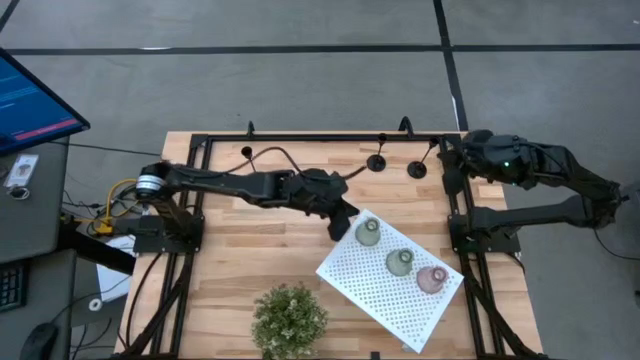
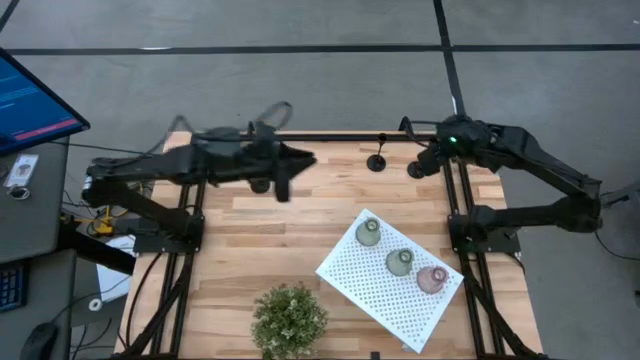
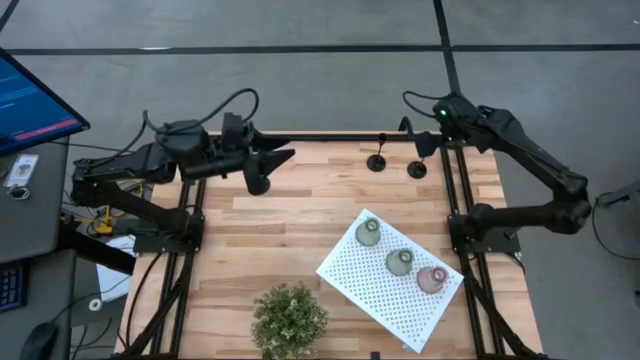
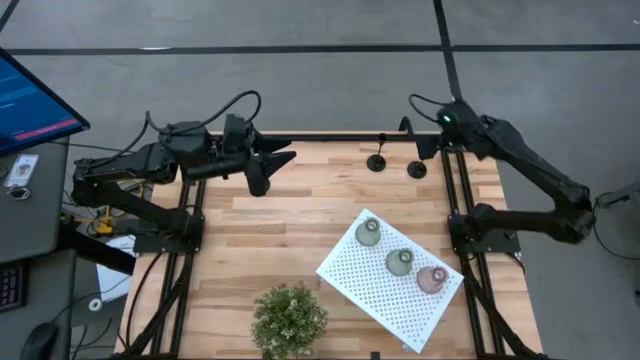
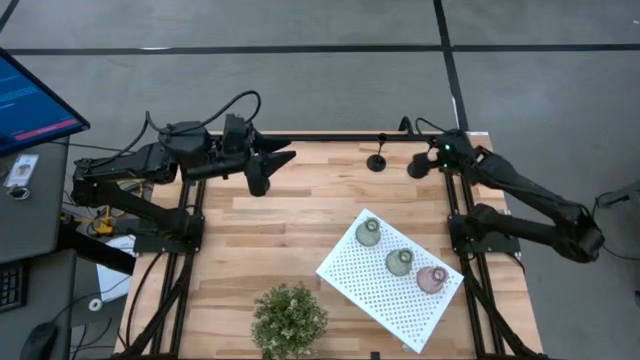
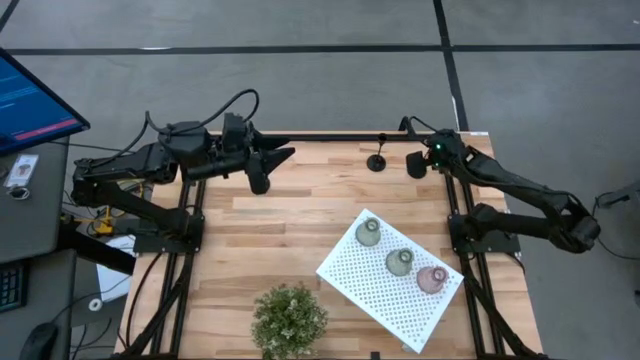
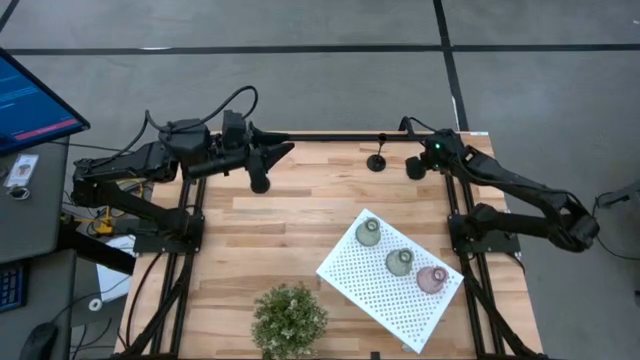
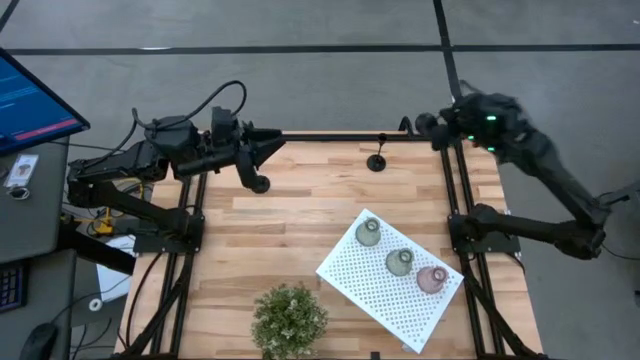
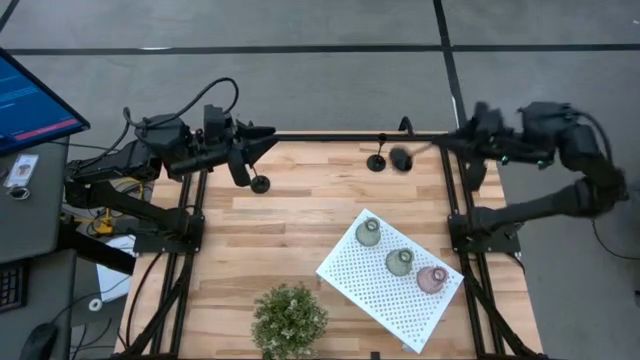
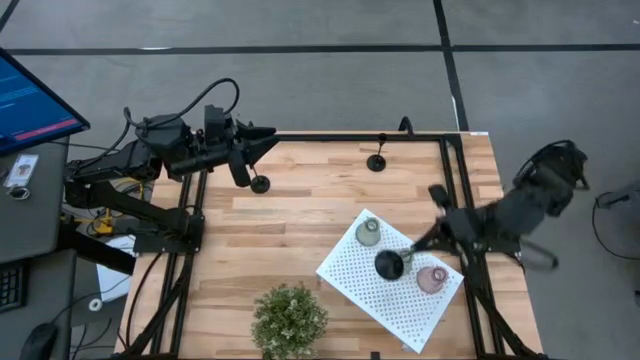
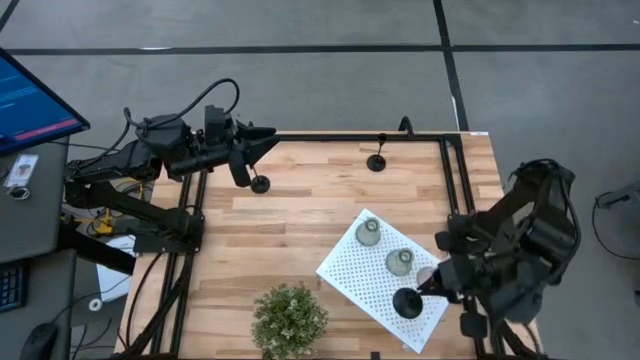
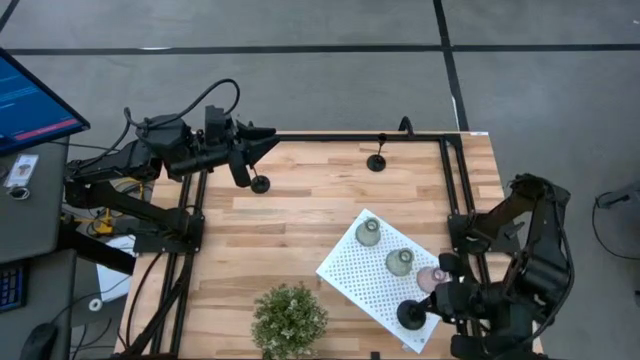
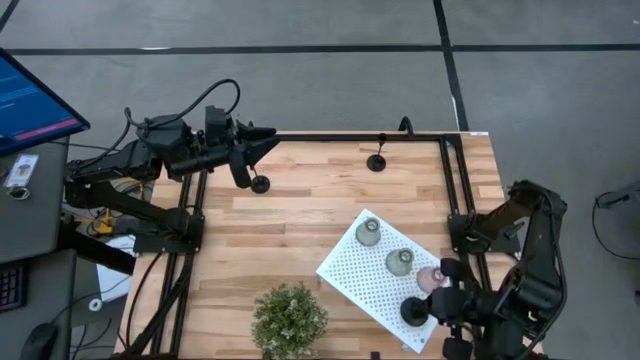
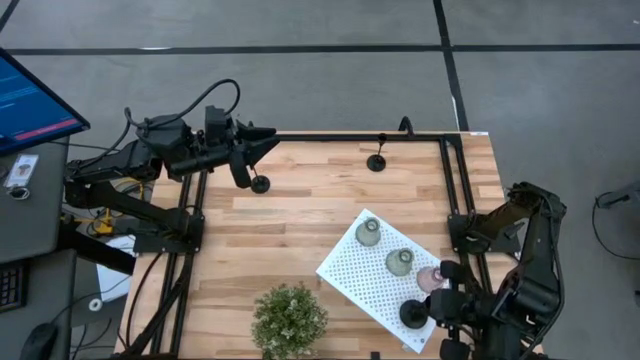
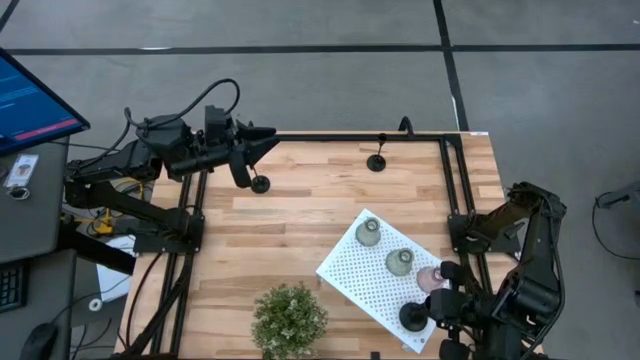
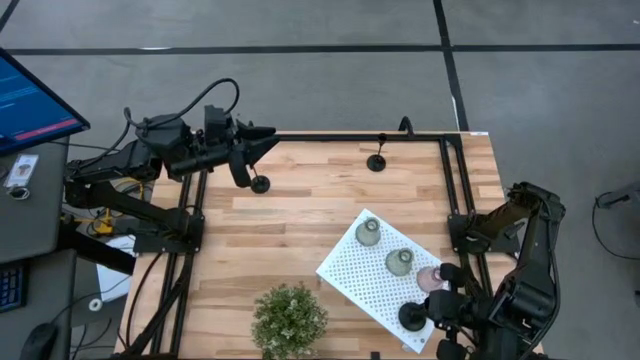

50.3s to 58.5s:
Task: Pick & Place candle stick holders
Put the right black candle holder on the shelf

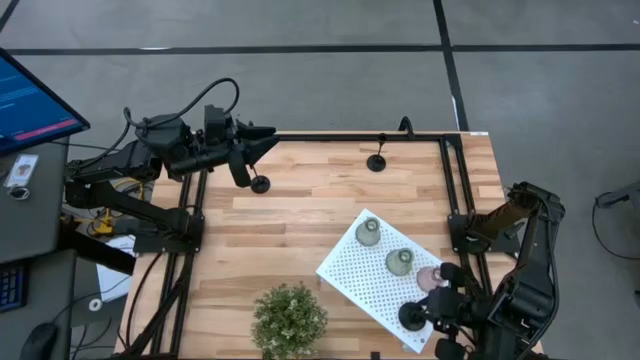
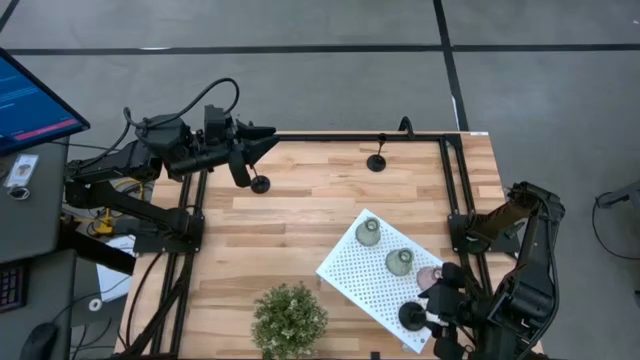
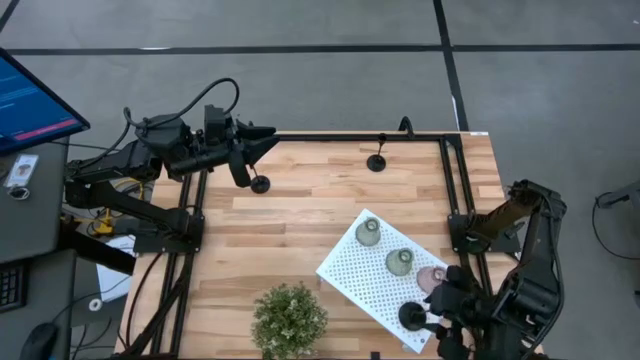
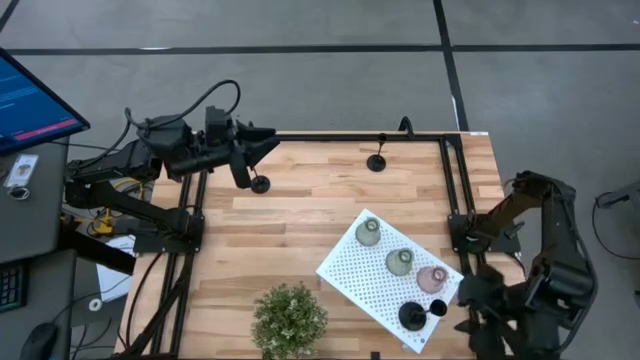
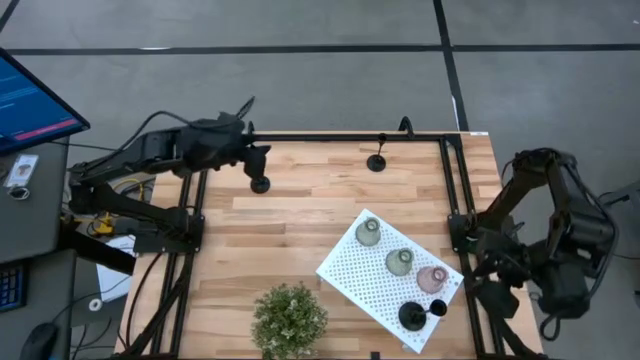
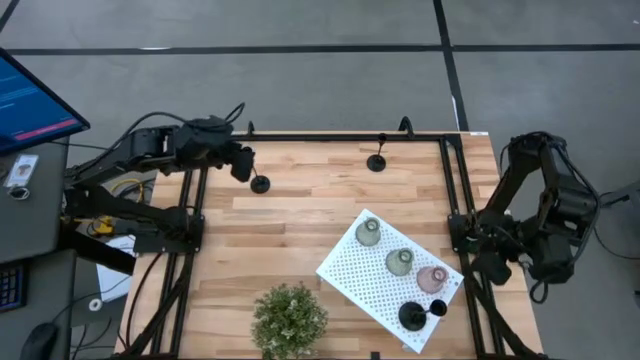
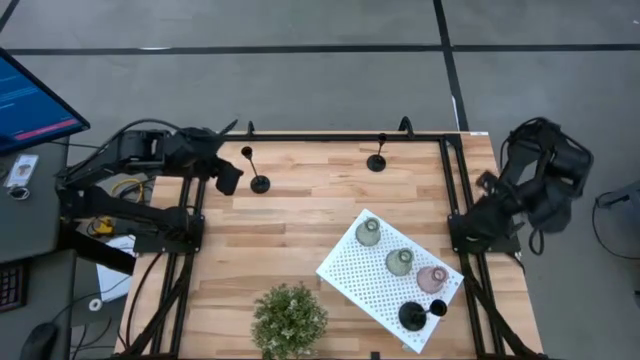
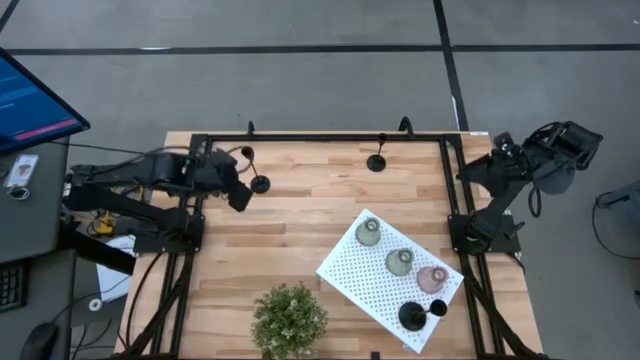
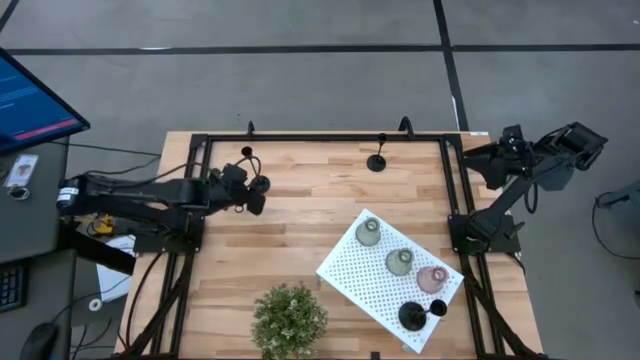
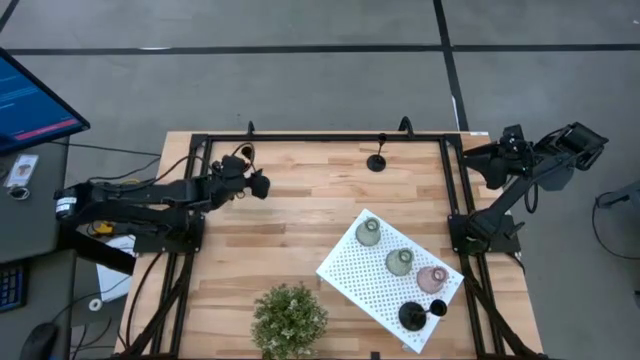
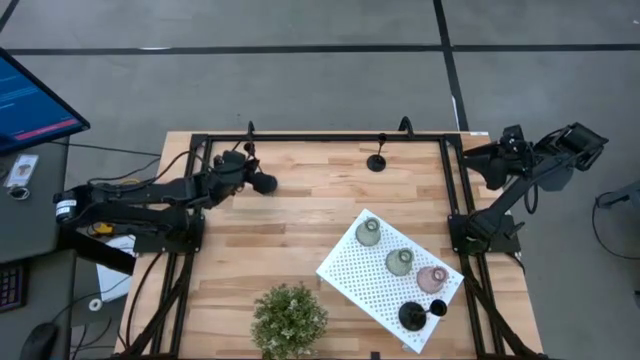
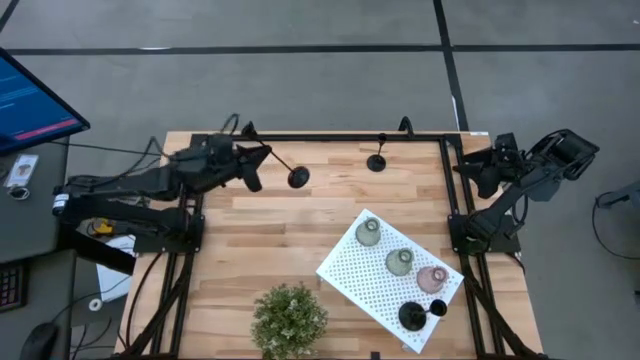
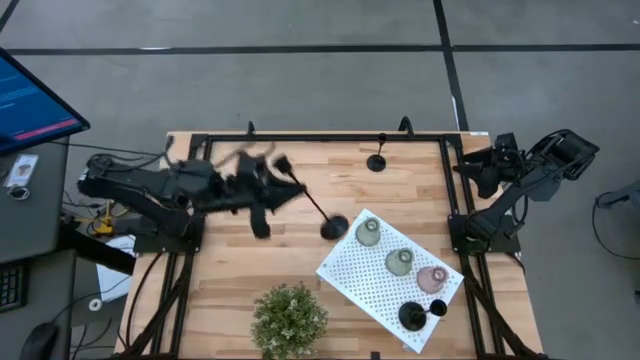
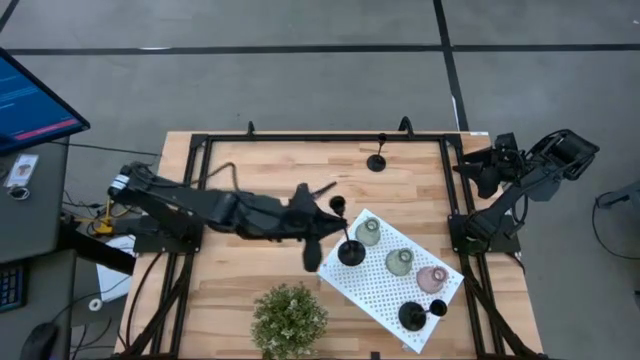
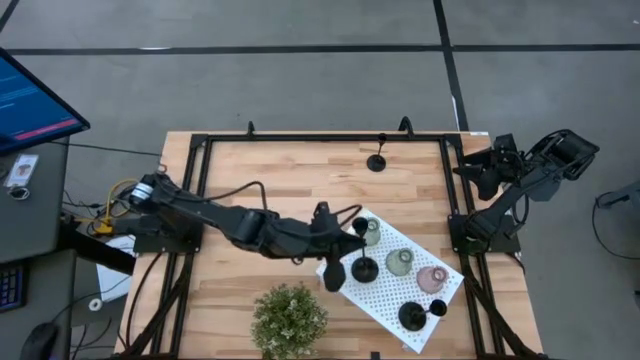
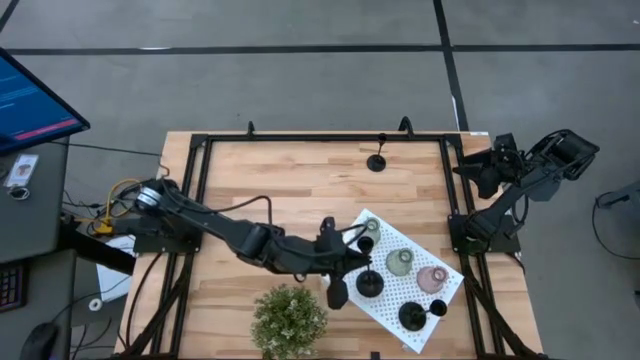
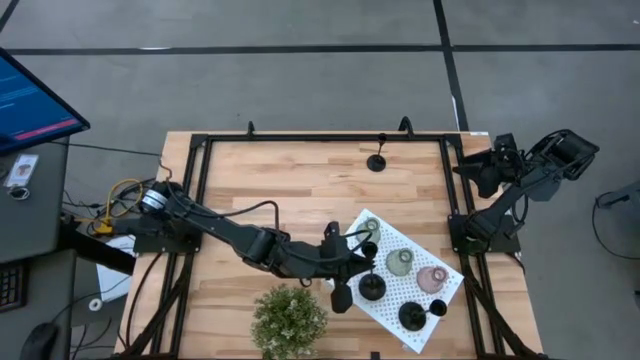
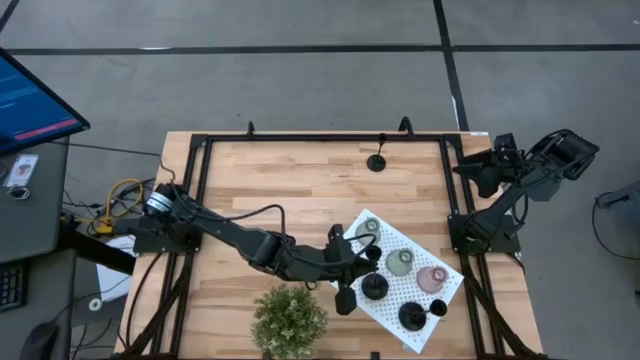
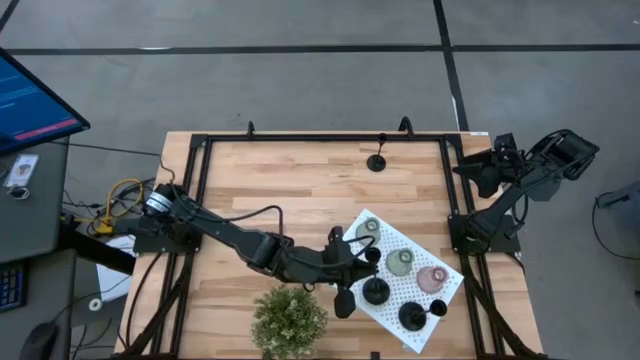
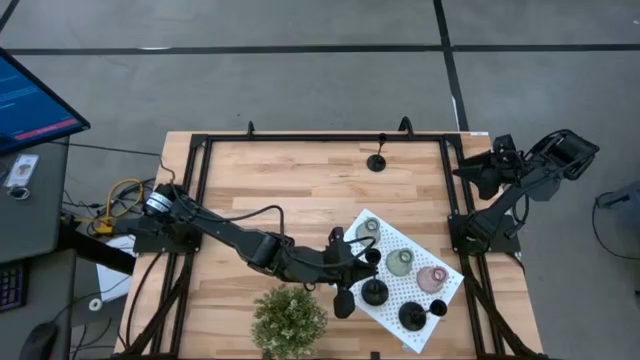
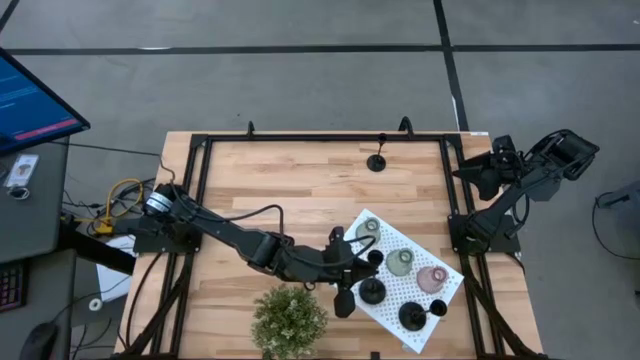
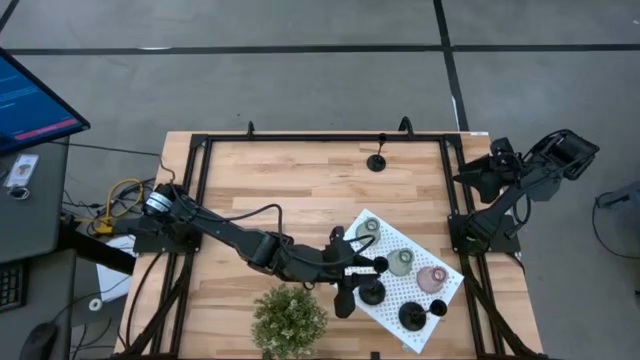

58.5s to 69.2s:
Put the left black candle holder on the shelf aligned with the black candle holder
